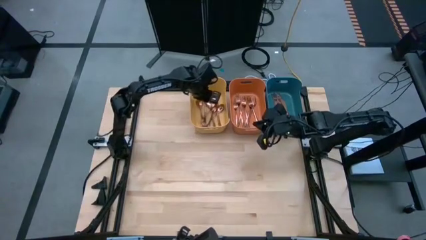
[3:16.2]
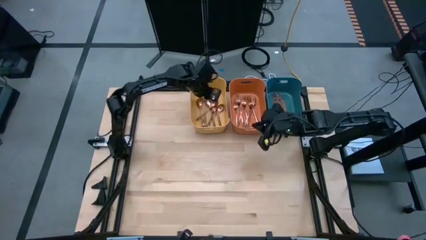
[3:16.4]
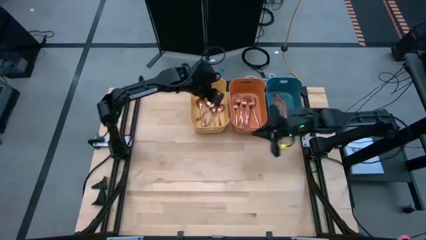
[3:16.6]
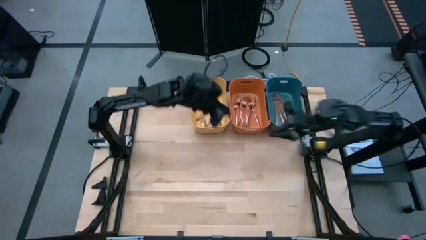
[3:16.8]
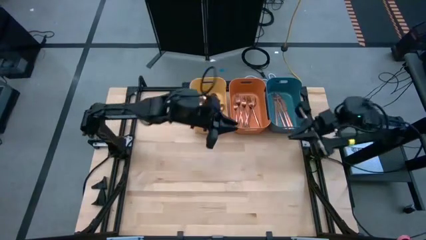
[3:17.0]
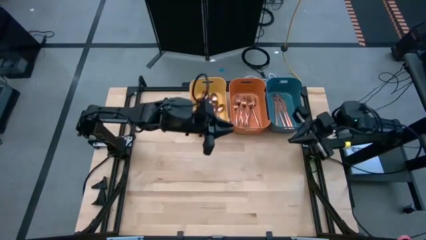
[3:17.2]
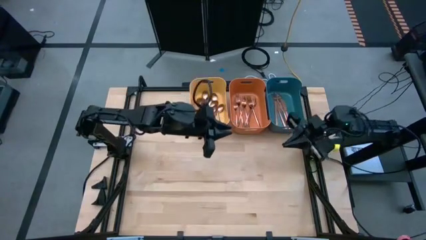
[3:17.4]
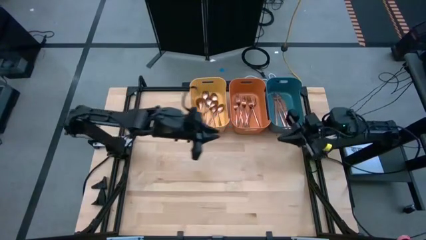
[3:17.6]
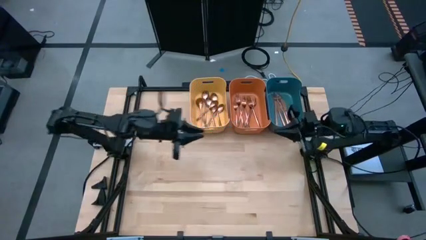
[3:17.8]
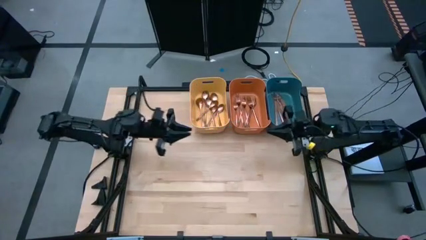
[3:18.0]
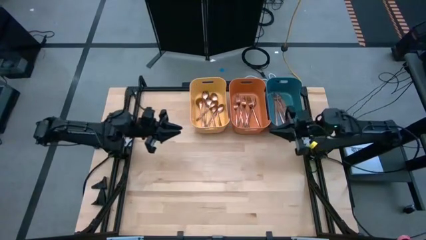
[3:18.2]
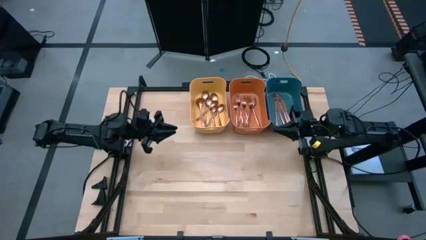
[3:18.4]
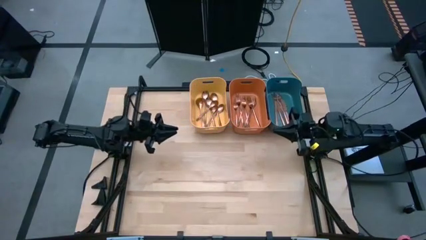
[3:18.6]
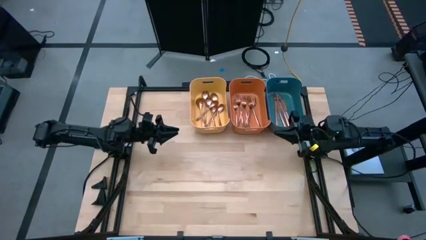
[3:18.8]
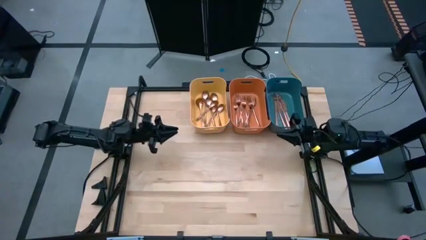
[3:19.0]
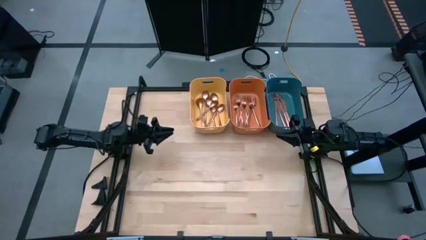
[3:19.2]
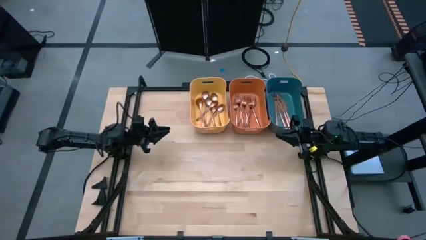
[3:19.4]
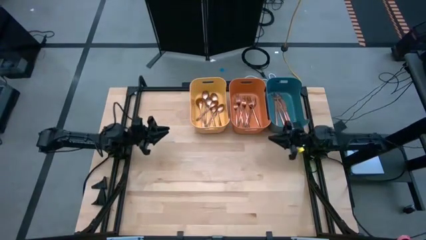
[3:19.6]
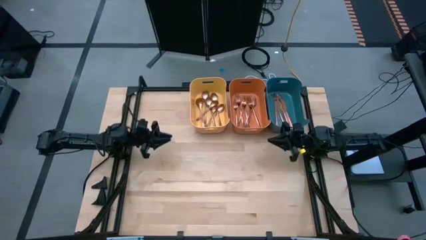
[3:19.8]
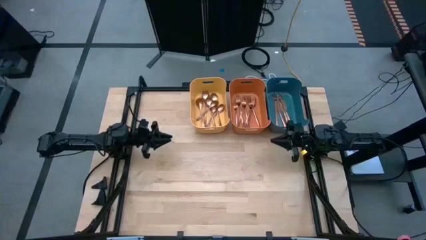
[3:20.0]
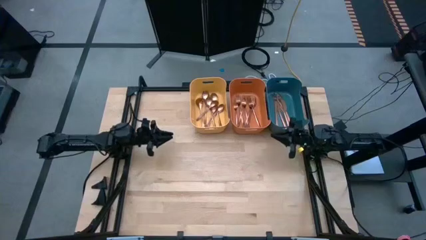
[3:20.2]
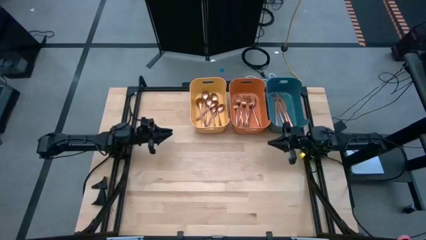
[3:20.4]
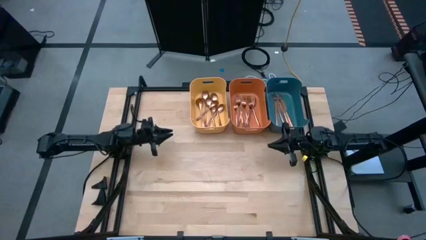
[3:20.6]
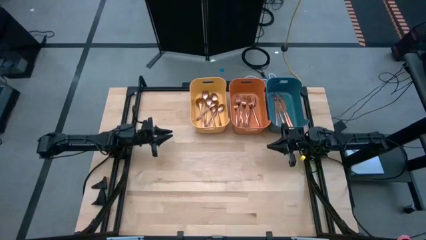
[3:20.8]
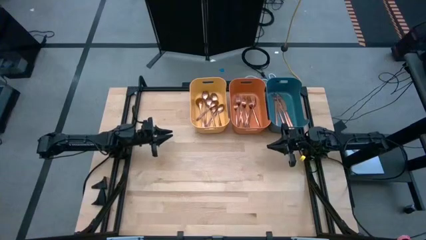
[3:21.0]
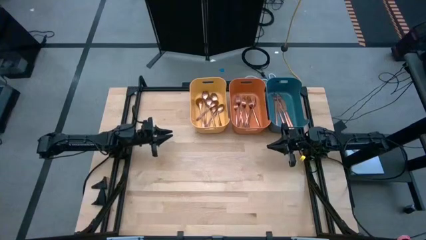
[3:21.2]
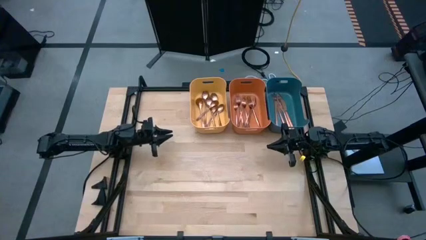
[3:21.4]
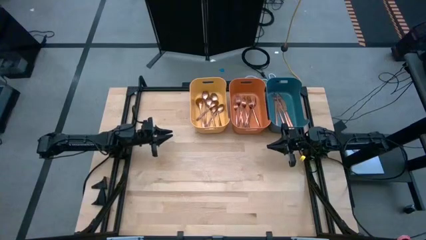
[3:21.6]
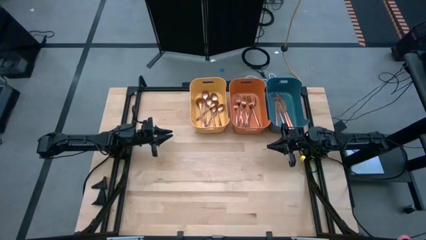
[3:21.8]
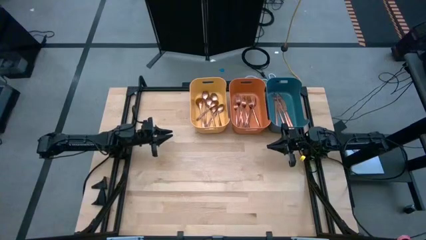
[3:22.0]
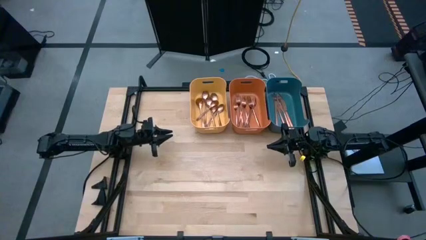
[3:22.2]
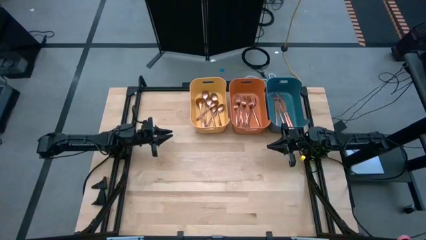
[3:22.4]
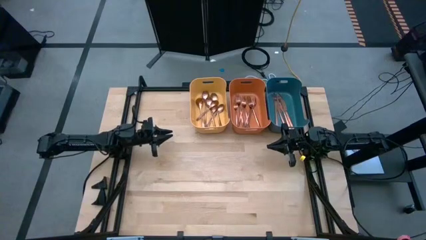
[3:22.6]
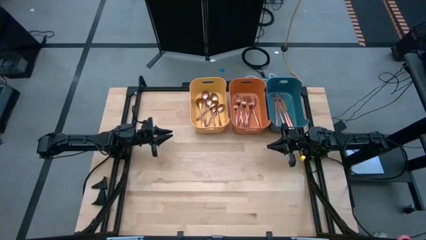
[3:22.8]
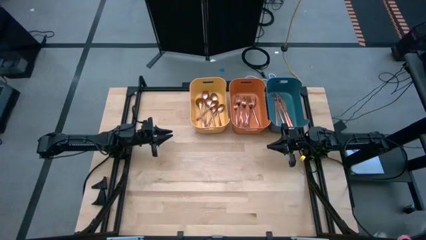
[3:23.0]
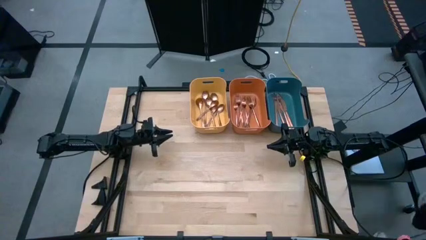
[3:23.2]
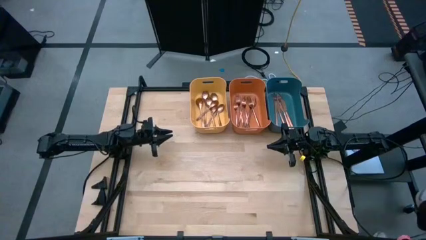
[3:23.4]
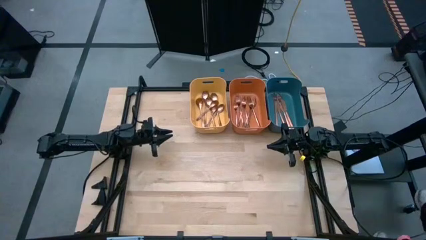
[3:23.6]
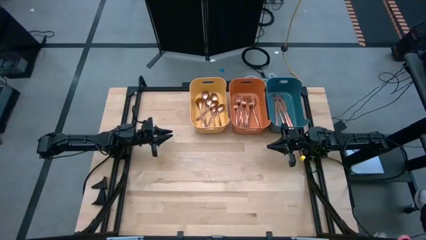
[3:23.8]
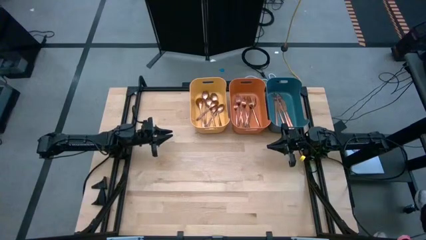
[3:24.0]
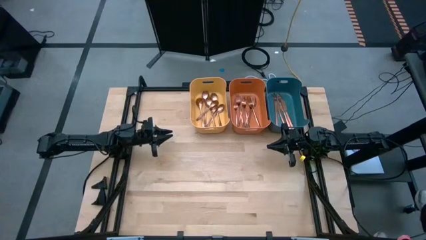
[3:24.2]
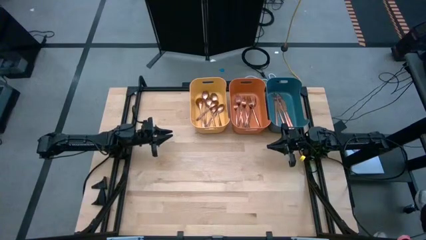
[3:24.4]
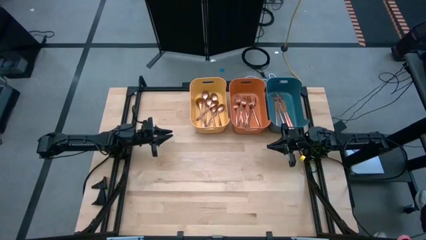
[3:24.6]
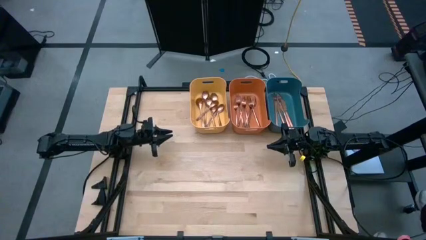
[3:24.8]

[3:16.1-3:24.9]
Task: Sort silverware
Return to Home Position

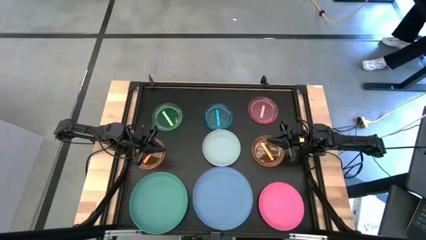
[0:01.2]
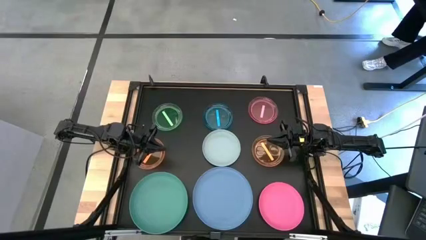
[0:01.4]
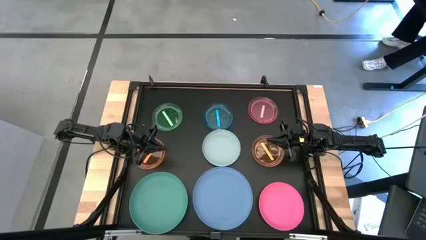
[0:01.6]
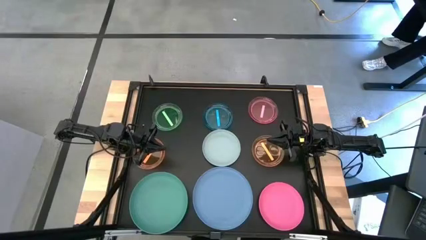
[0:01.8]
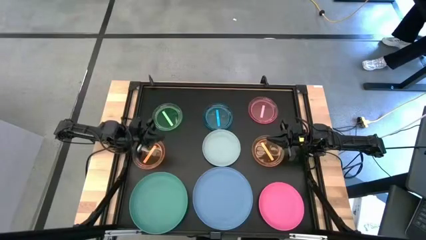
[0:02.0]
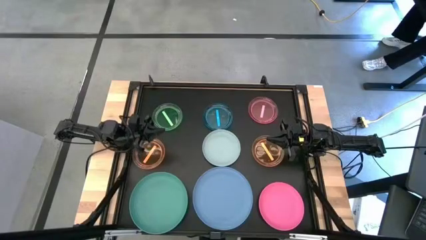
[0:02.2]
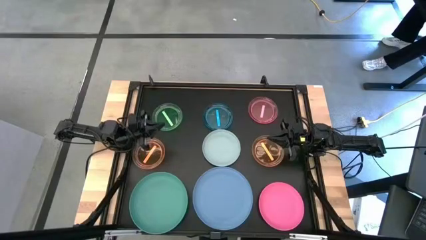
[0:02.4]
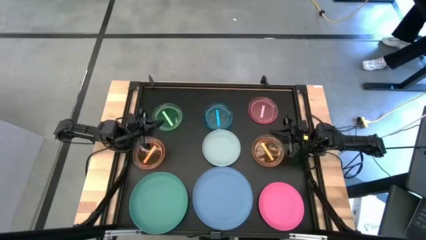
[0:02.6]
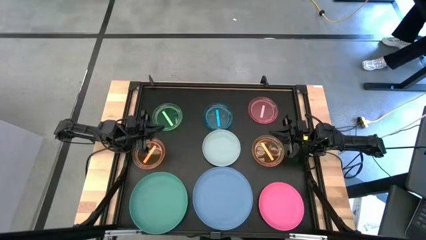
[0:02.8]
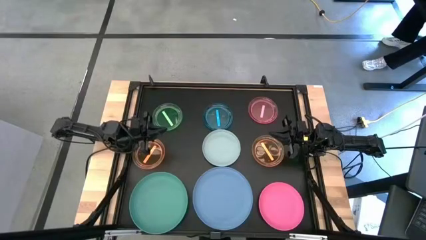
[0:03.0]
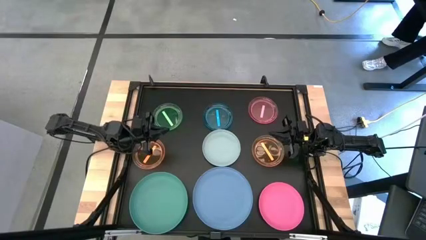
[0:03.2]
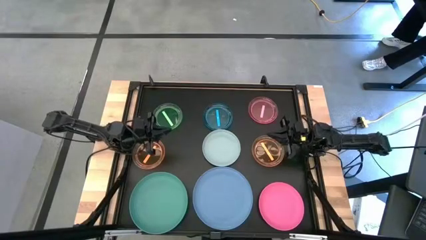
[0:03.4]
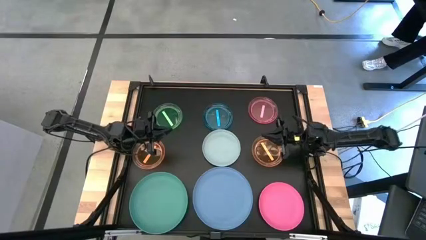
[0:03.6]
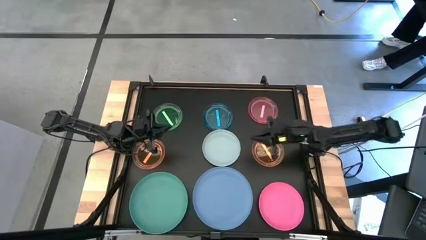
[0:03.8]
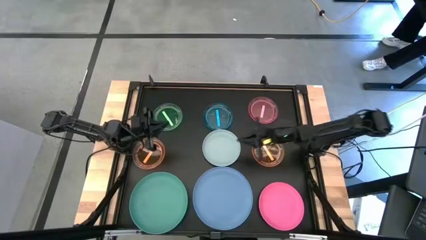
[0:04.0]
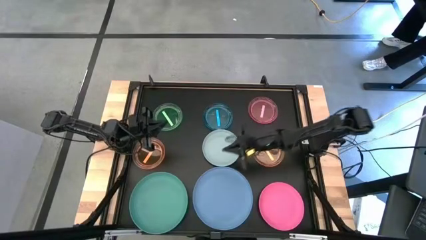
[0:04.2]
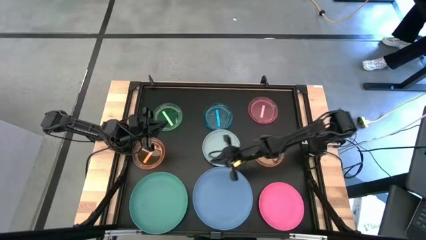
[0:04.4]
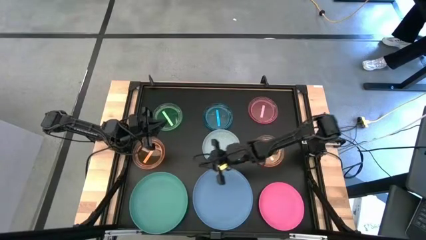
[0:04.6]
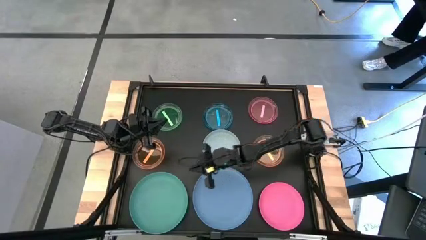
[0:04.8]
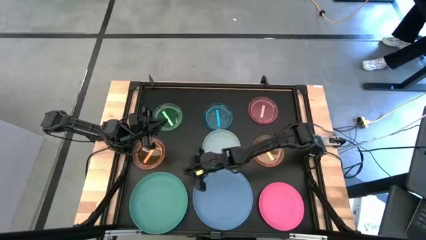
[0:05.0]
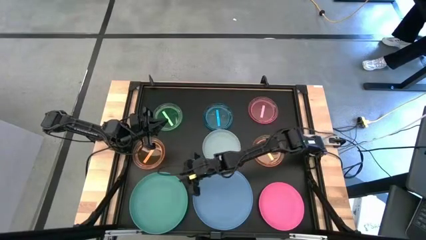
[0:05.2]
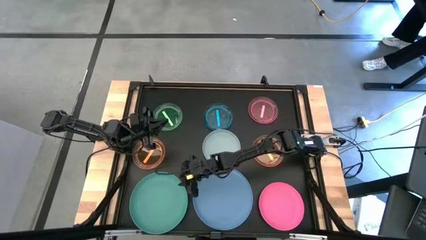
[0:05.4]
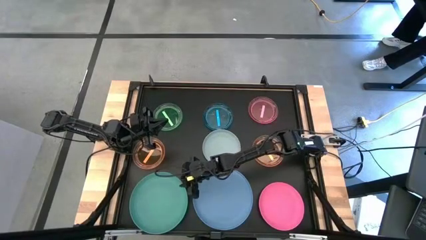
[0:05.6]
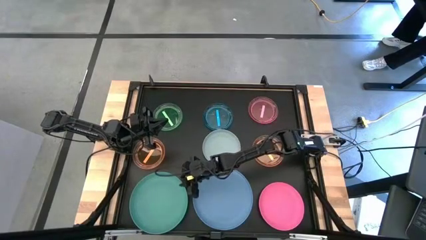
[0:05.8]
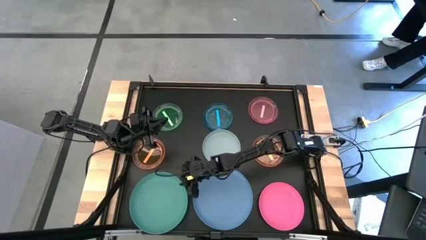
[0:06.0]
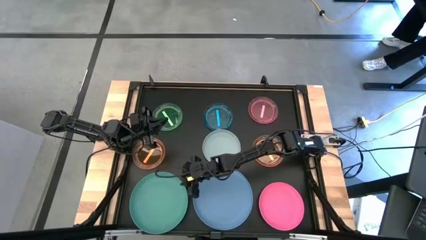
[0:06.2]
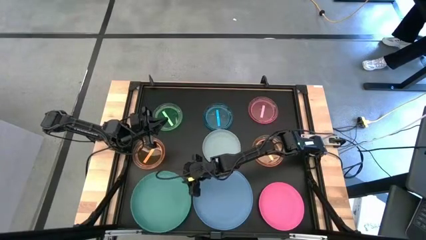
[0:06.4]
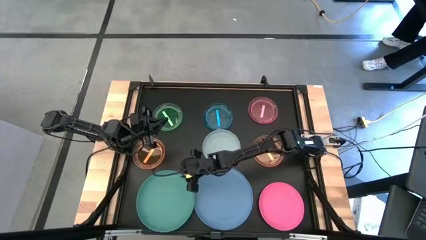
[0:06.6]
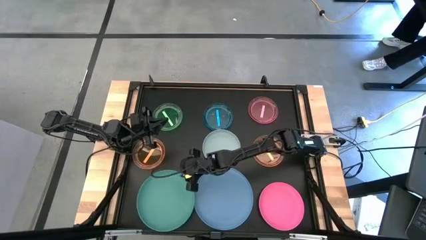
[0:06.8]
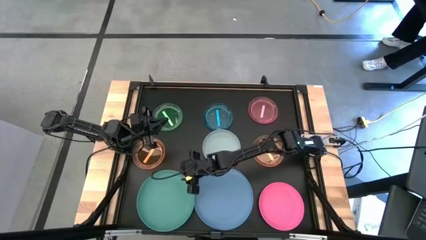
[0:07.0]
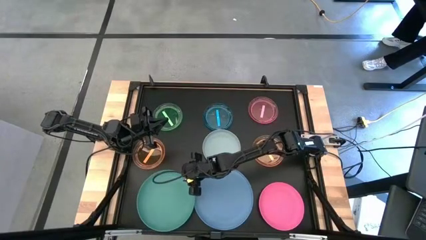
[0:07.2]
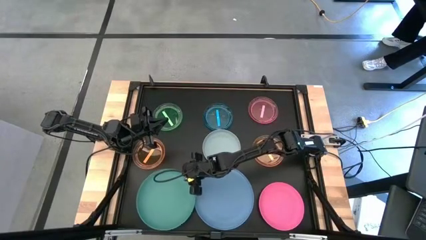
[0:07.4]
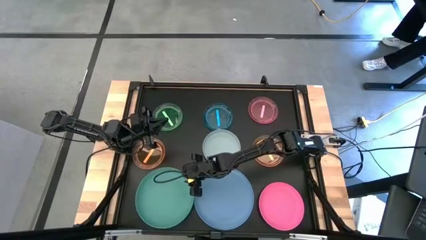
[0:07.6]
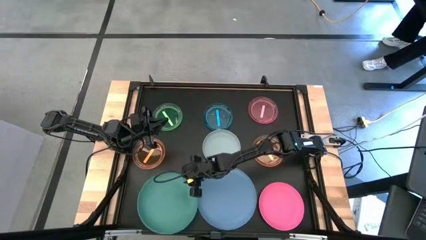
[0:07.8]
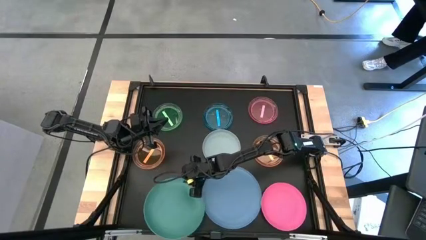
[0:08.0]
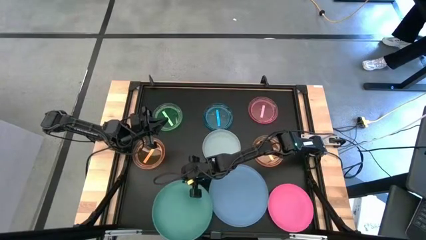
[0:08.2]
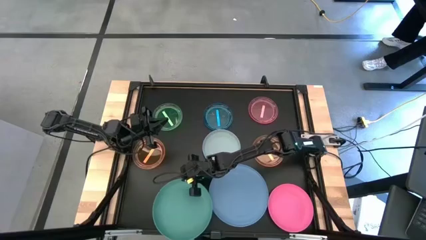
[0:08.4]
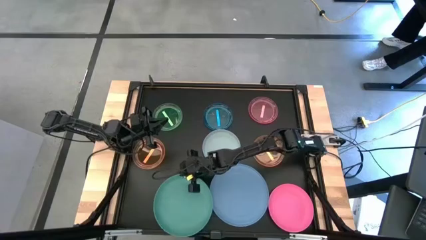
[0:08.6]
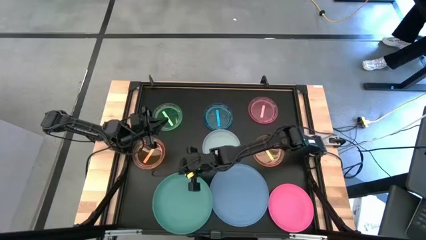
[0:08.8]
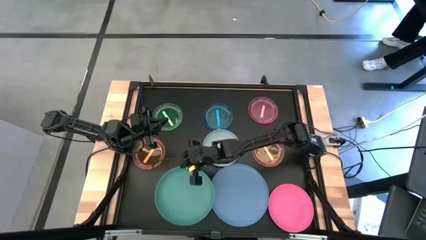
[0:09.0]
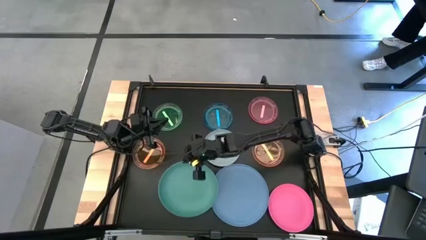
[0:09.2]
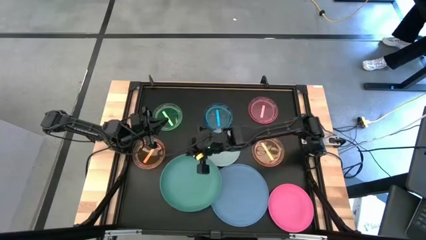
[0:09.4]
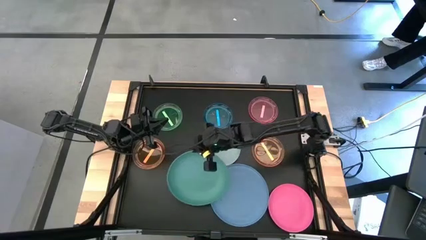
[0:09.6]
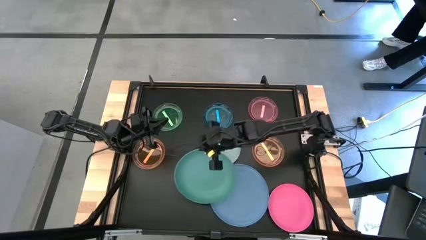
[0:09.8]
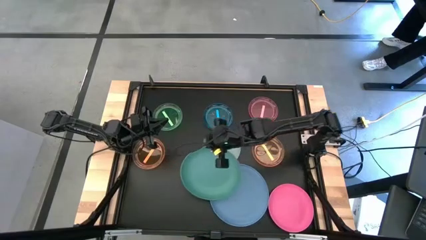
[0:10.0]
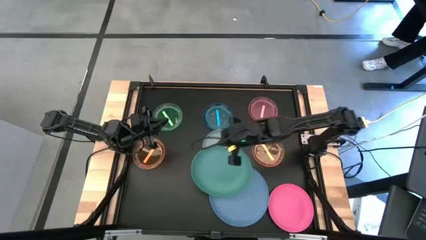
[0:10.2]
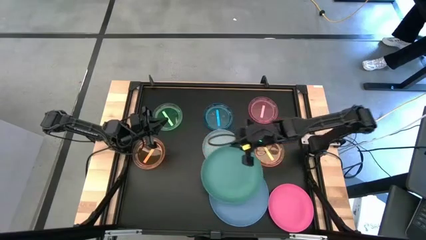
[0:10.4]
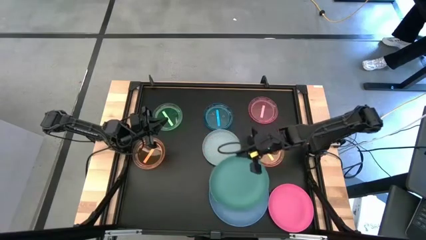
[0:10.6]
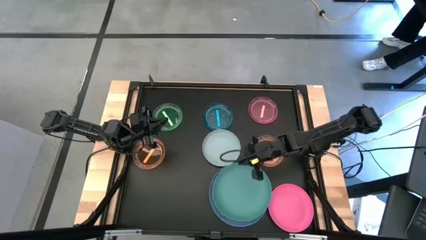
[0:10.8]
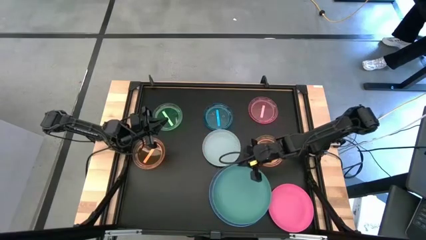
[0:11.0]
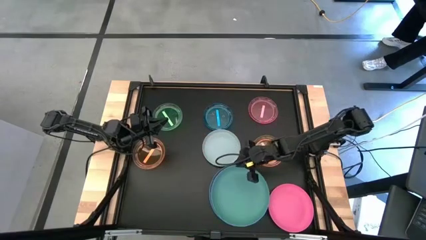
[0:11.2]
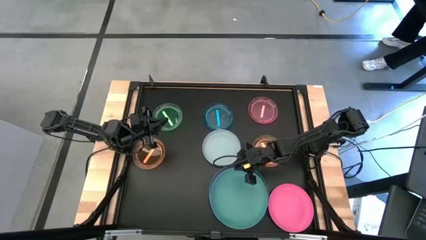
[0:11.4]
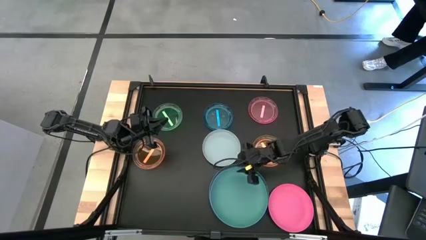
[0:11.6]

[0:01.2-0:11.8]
Task: Stack plastic plates
Stack the green plate on top of the blue plate
